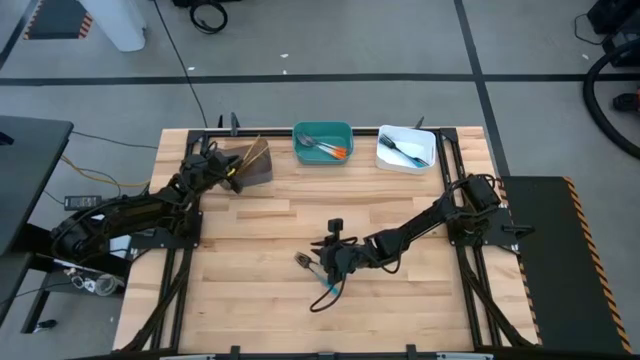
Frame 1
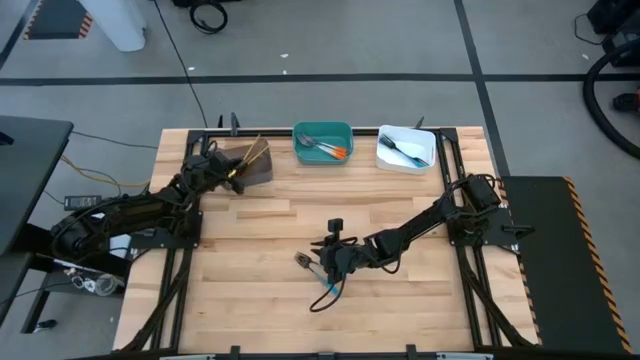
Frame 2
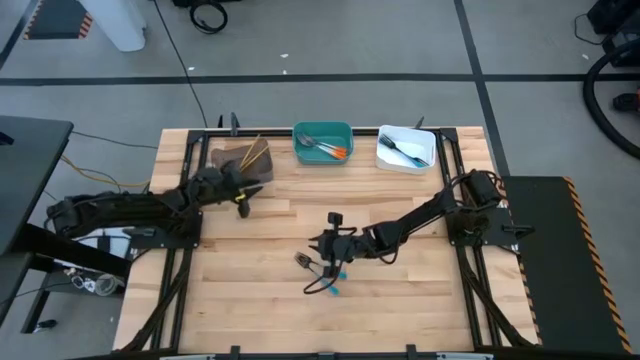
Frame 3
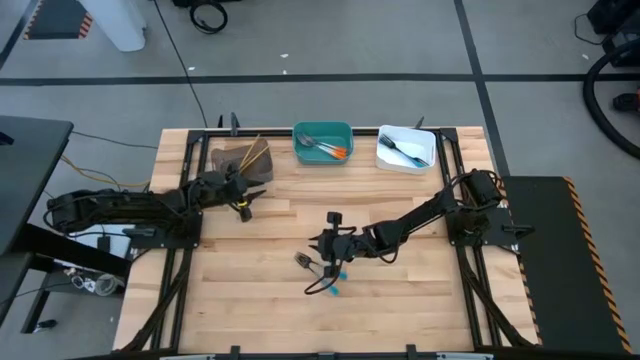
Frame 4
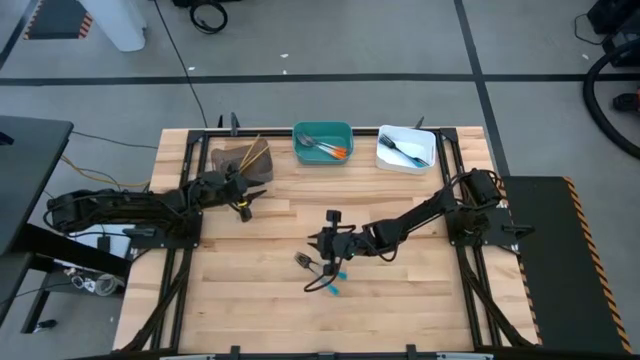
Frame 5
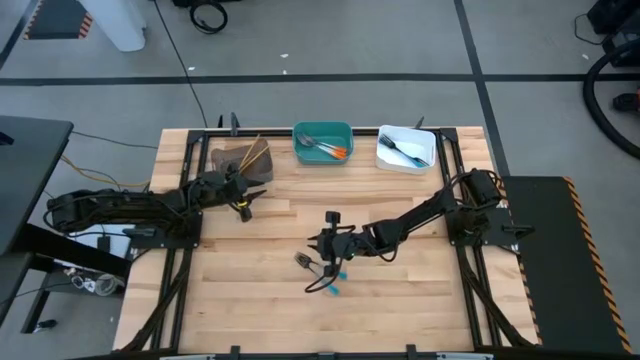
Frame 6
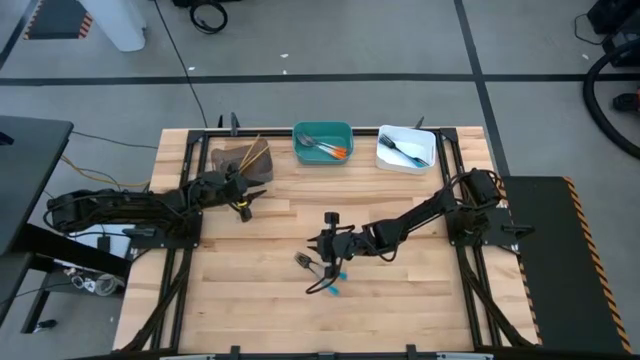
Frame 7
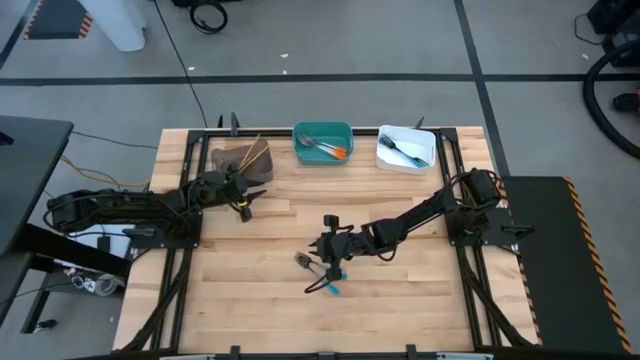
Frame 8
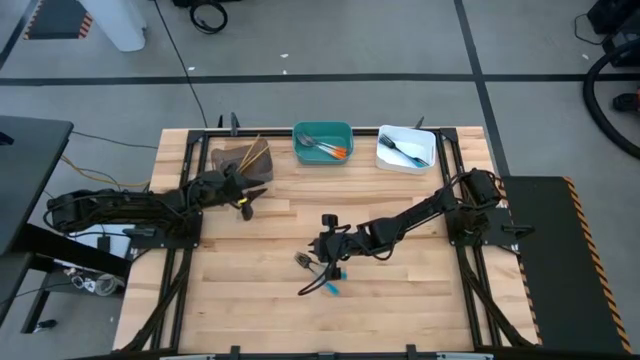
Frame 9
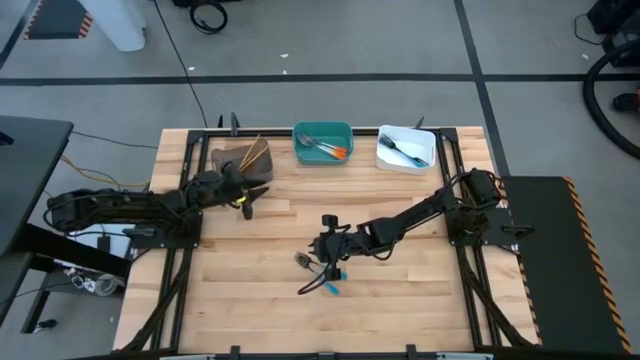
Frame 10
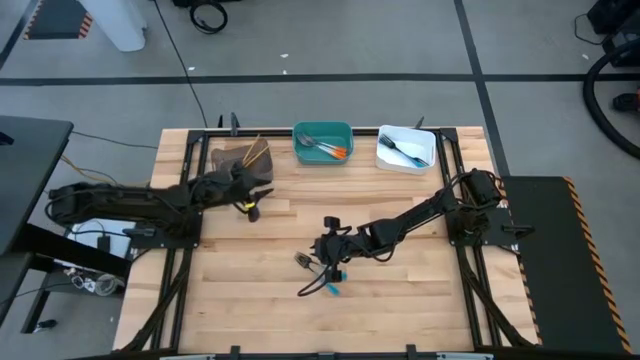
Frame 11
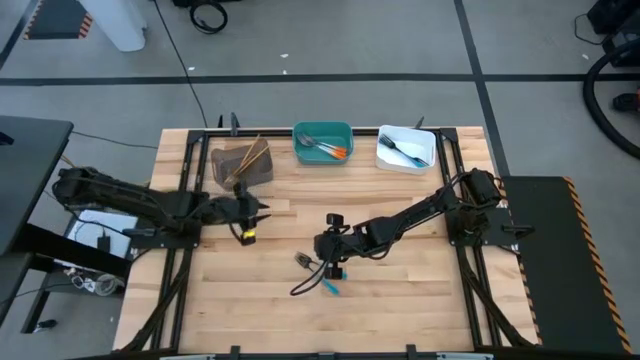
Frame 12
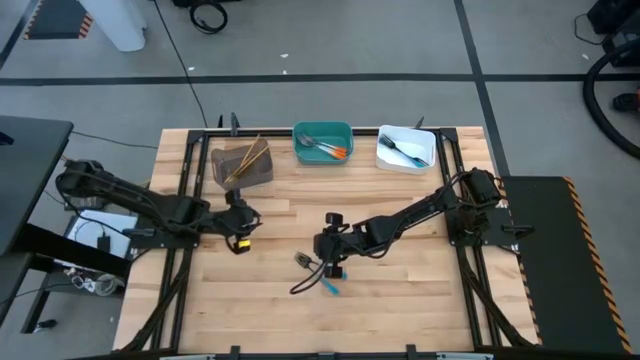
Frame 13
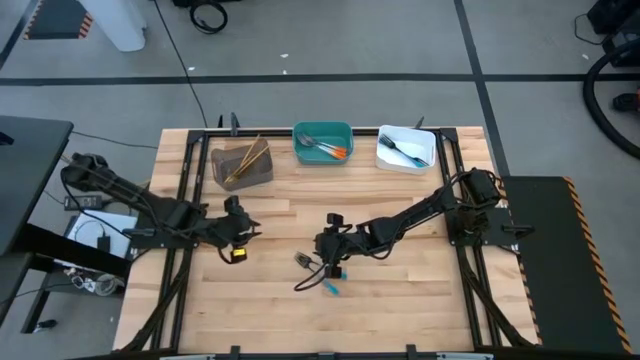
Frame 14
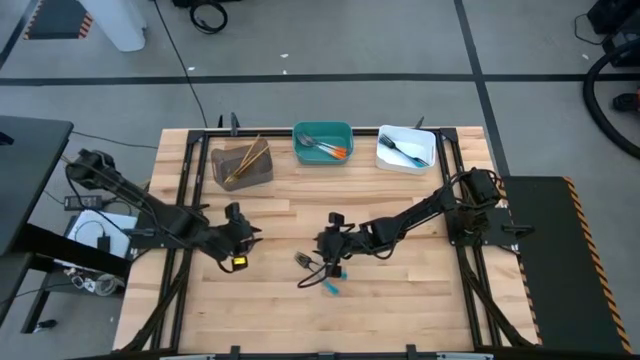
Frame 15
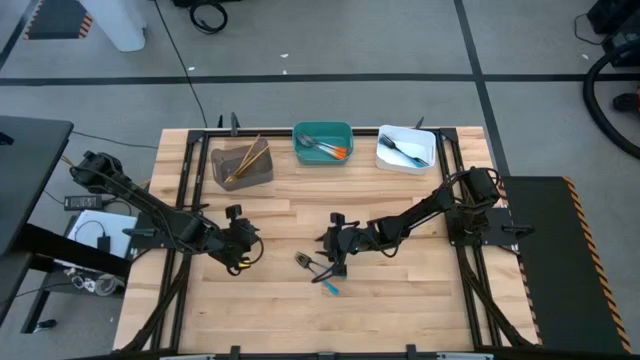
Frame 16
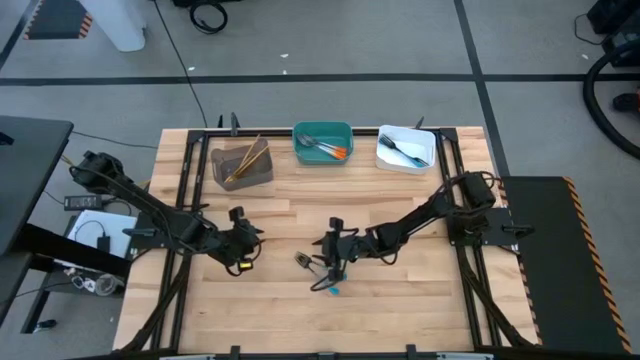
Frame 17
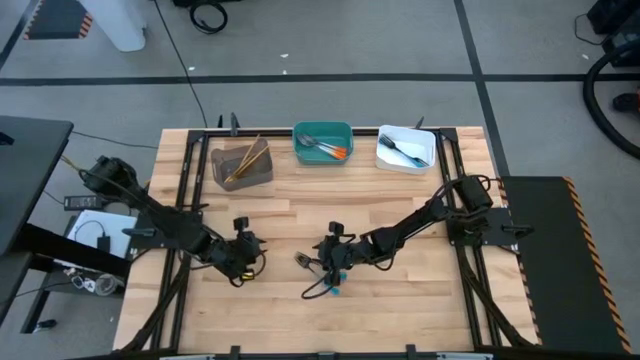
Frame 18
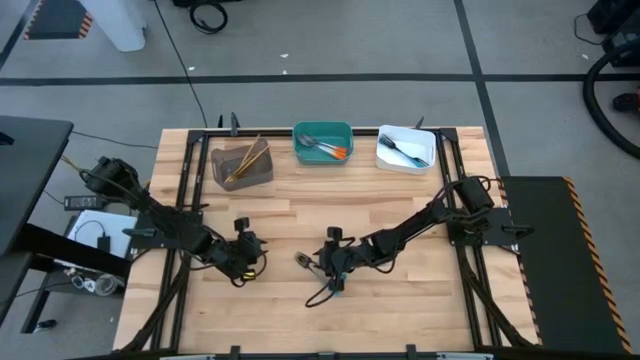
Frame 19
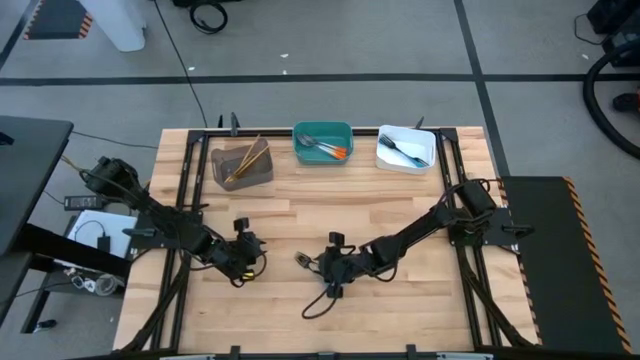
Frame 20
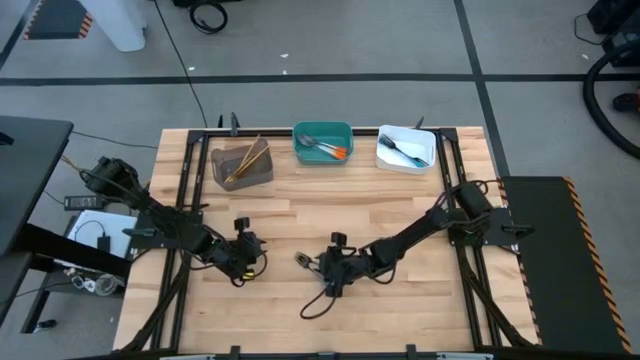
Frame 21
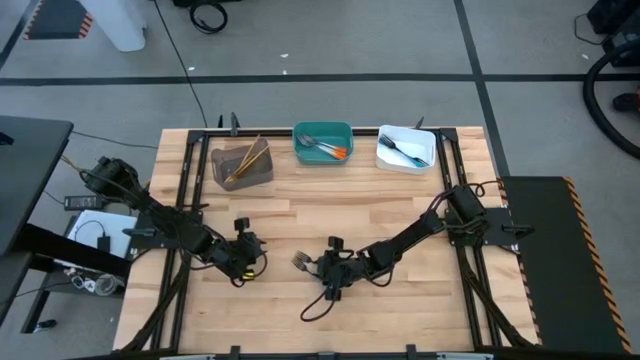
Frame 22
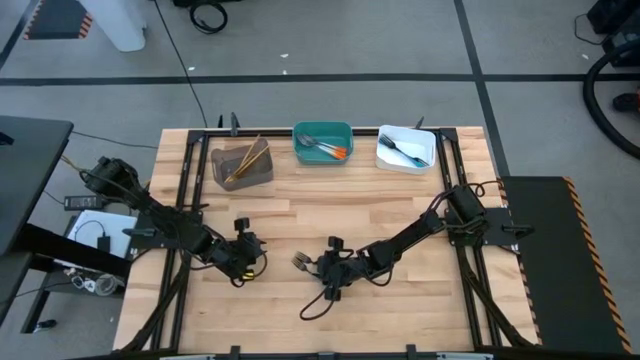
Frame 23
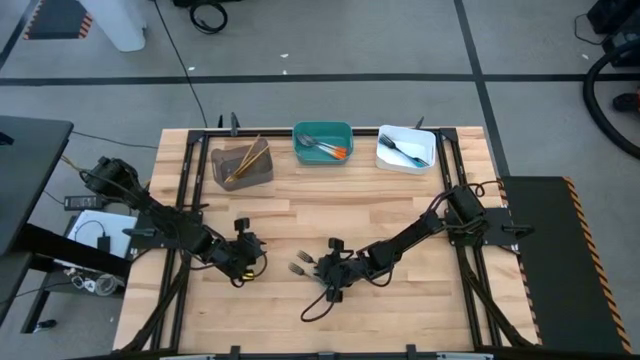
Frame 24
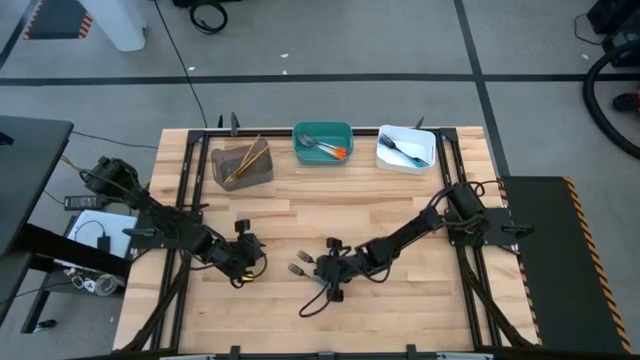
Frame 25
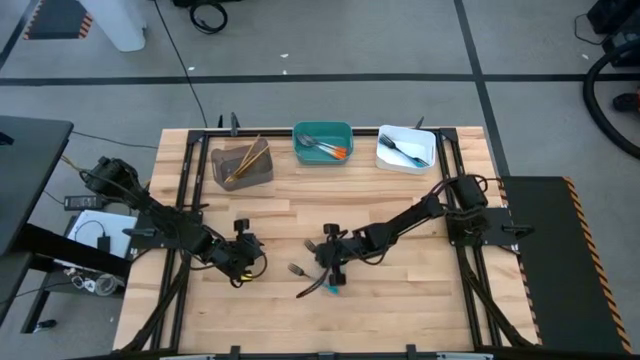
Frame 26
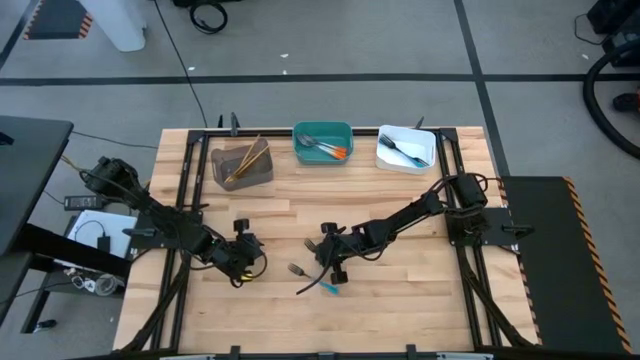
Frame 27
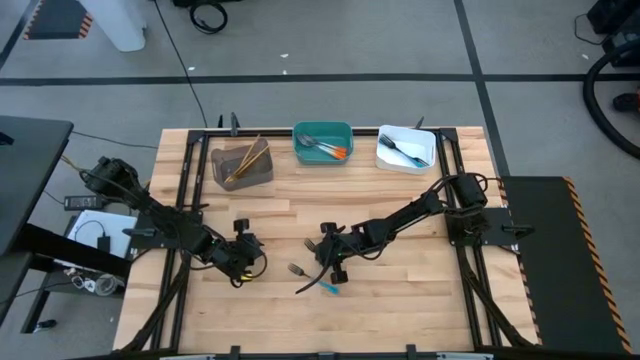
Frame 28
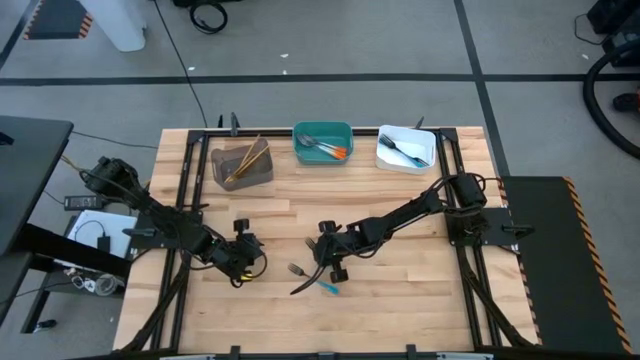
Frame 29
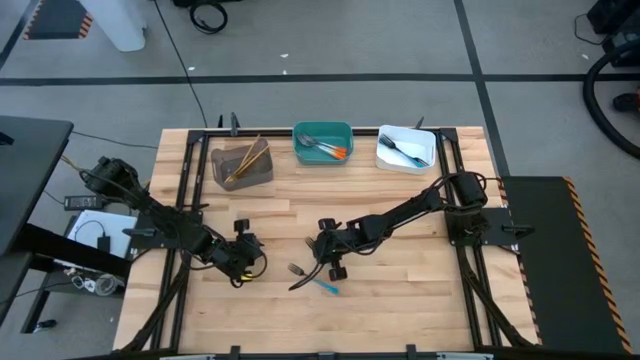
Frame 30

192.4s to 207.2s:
Task: Sort silverware by color (type)
Put the blue fork into the white bin

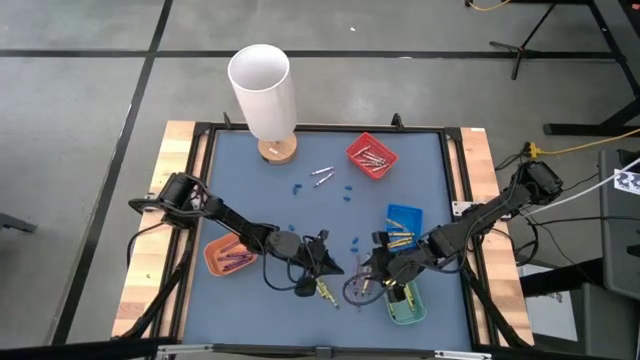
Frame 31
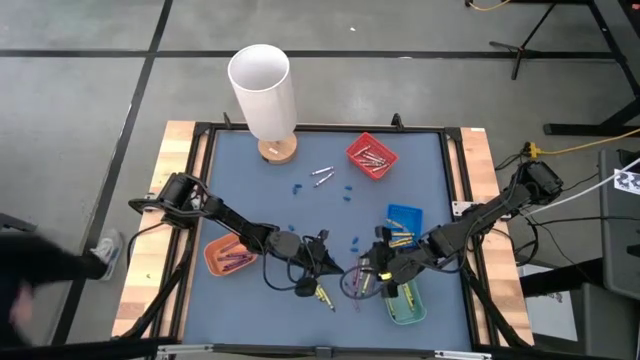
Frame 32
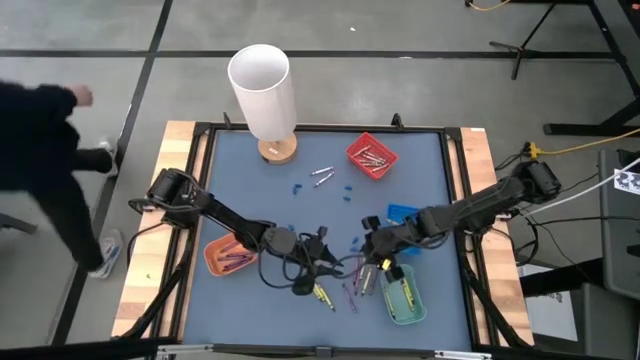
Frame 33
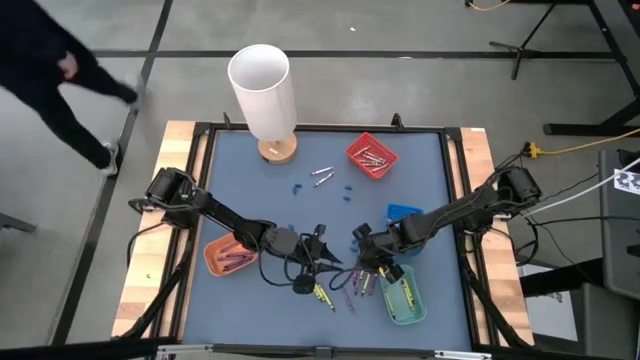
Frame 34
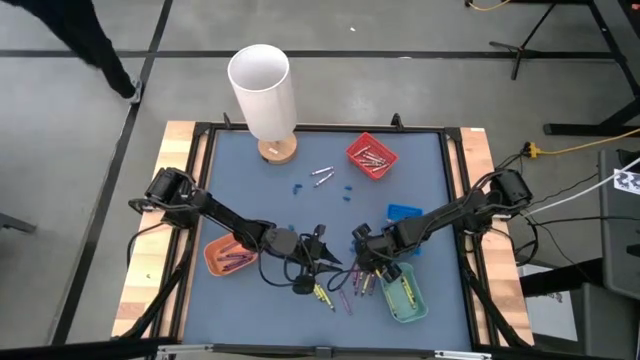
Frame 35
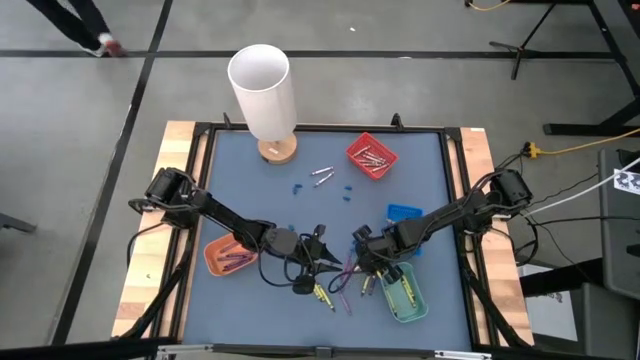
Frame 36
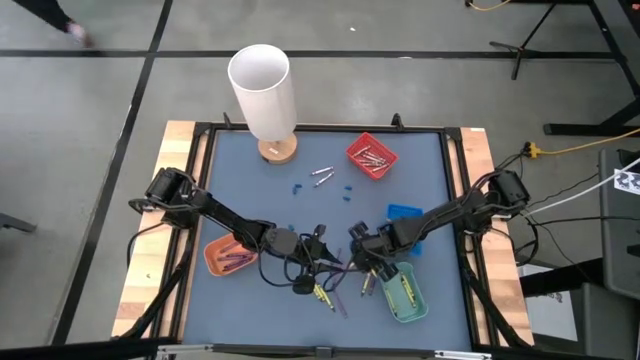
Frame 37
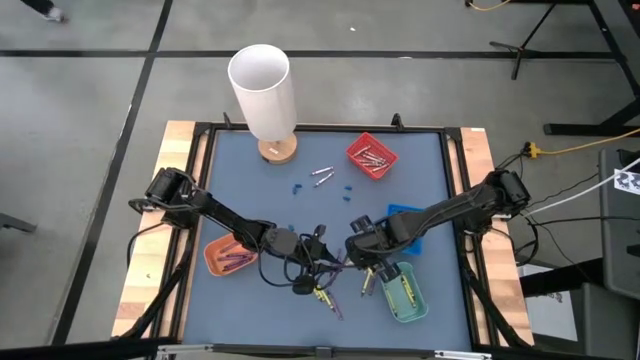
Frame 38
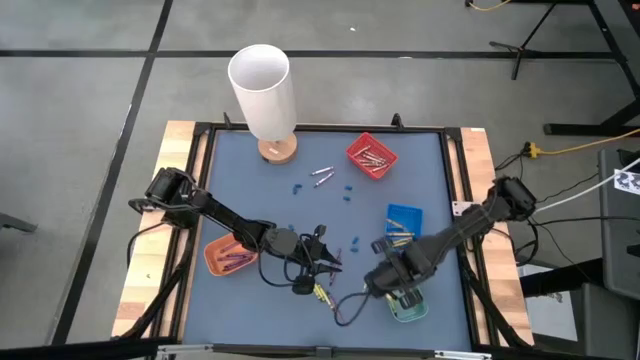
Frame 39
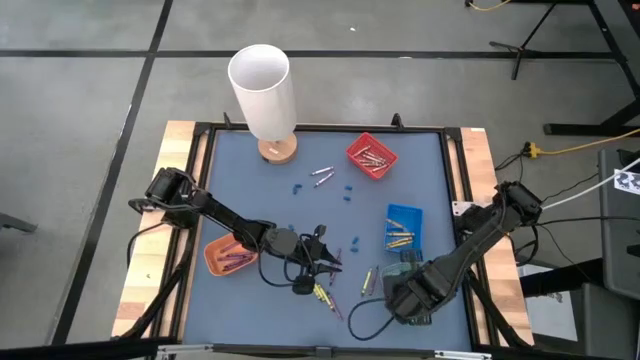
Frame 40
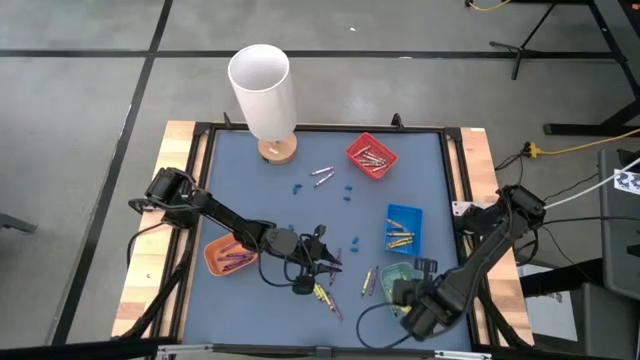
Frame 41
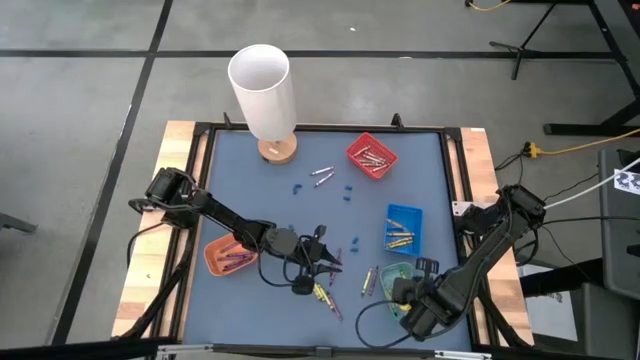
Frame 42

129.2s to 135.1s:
Task: Sort crayons
Put the green crayon into the green bin
